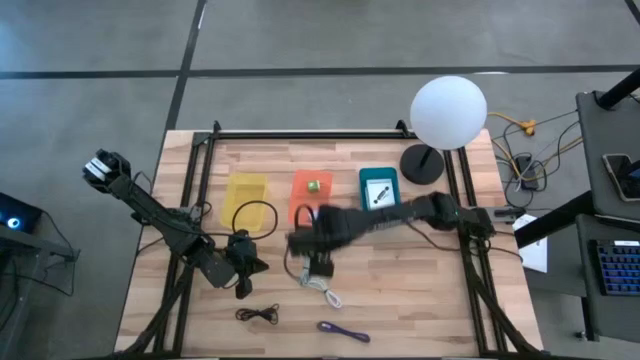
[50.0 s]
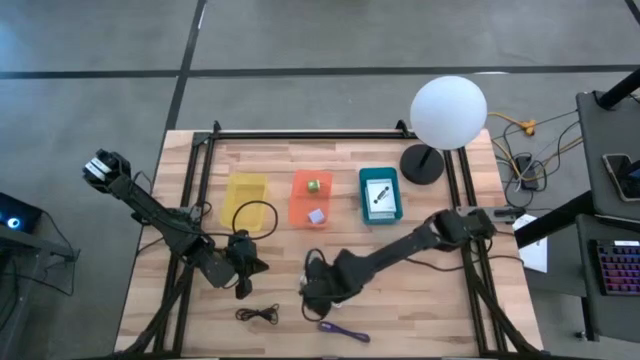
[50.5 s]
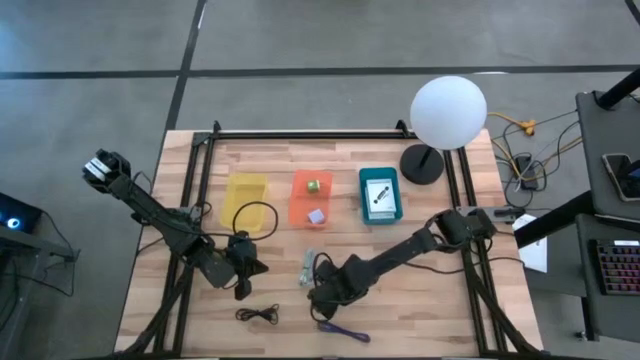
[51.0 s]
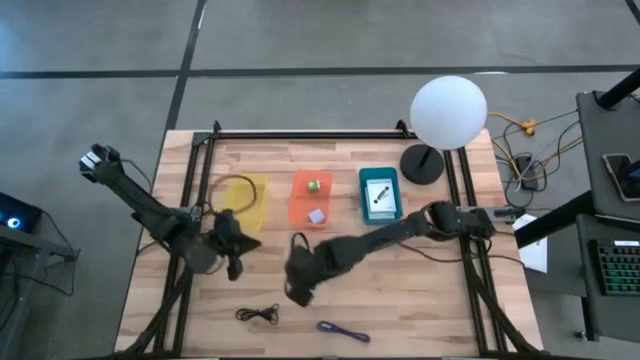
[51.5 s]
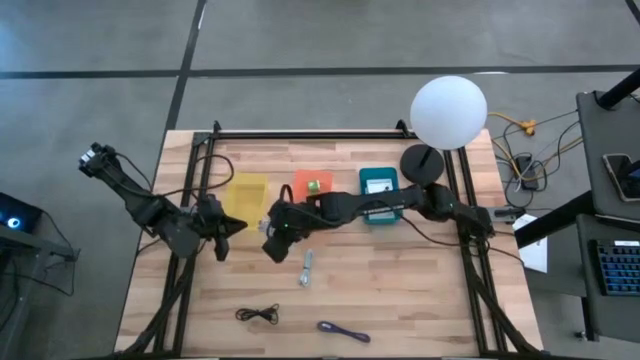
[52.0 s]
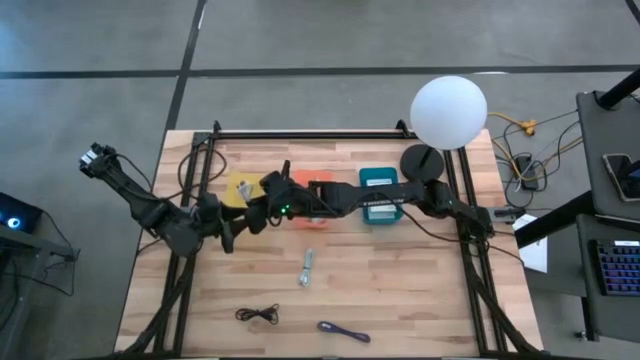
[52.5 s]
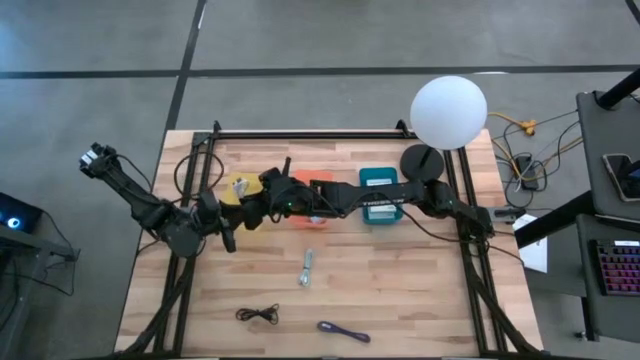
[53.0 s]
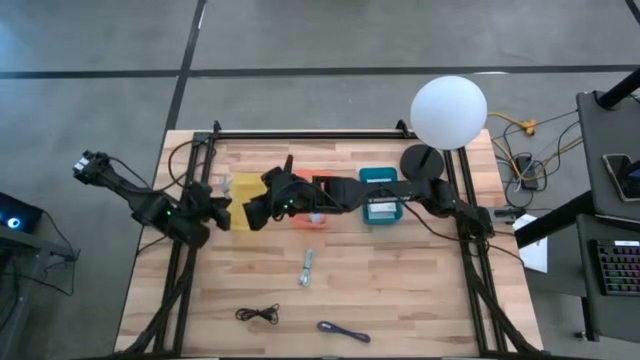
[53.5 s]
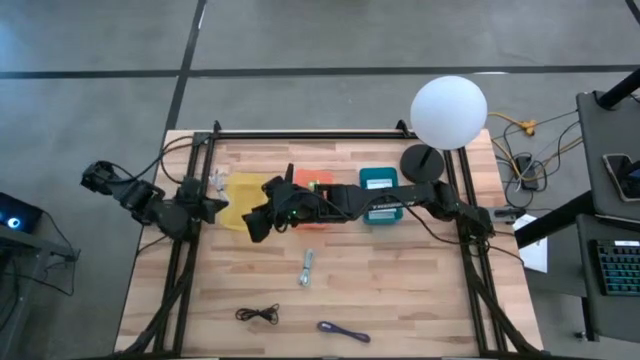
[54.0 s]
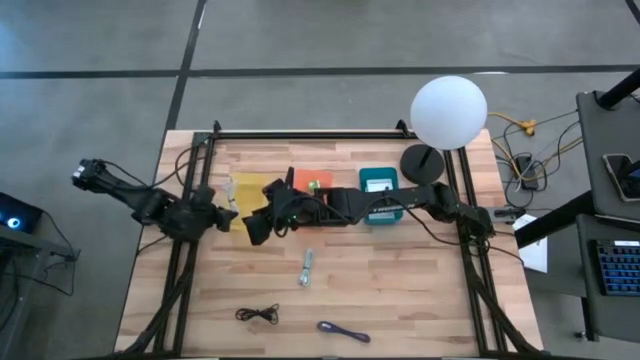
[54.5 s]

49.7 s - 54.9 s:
Task: Pick and place items into bin
Put the white charger cable into the yellow bin

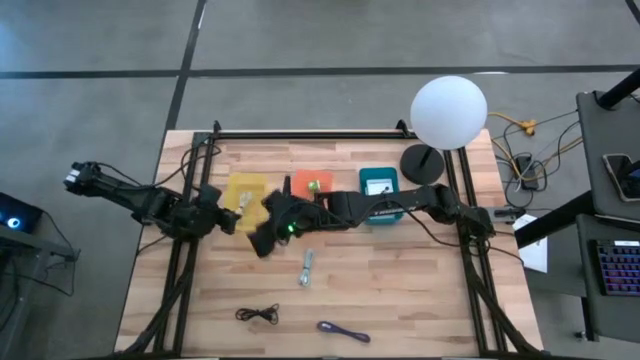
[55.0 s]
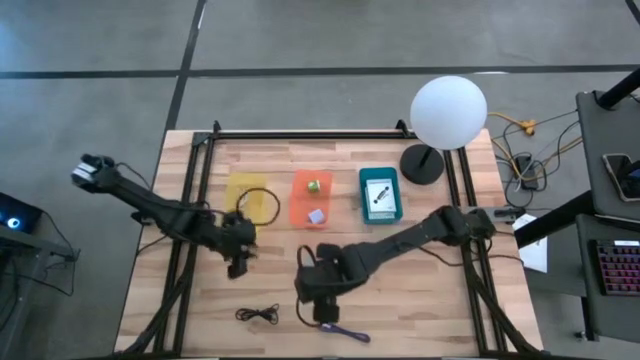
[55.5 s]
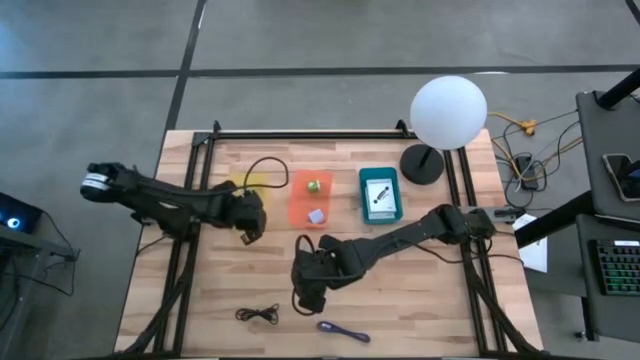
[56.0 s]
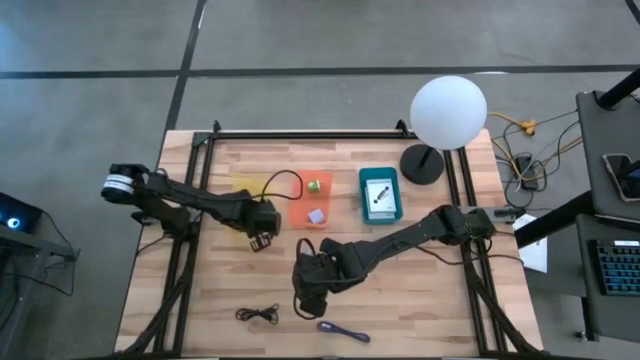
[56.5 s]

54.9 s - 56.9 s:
Adjust the yellow bin

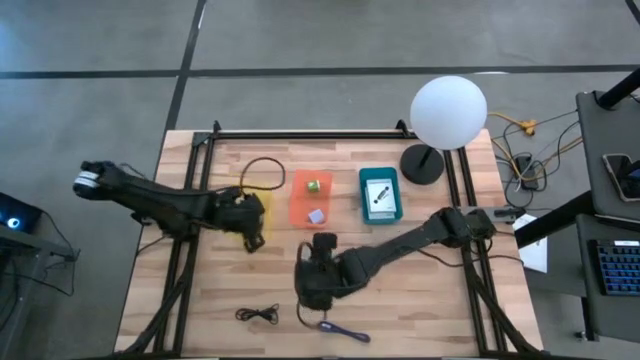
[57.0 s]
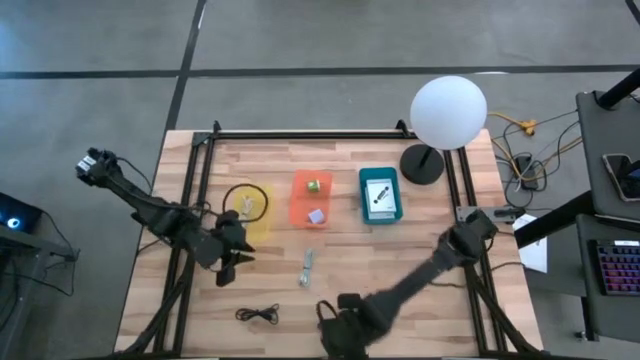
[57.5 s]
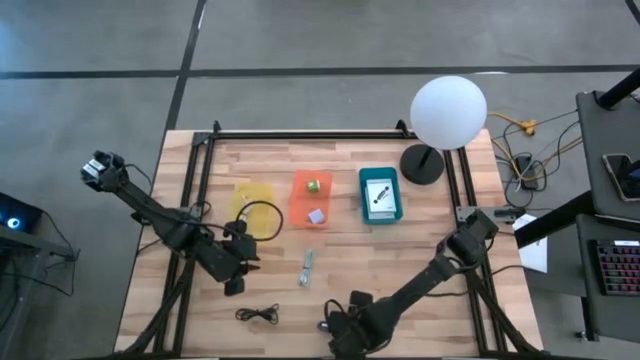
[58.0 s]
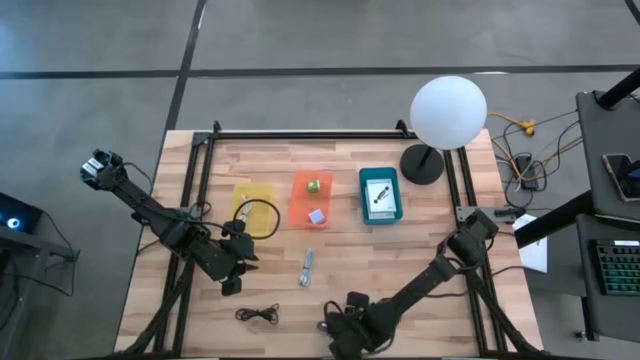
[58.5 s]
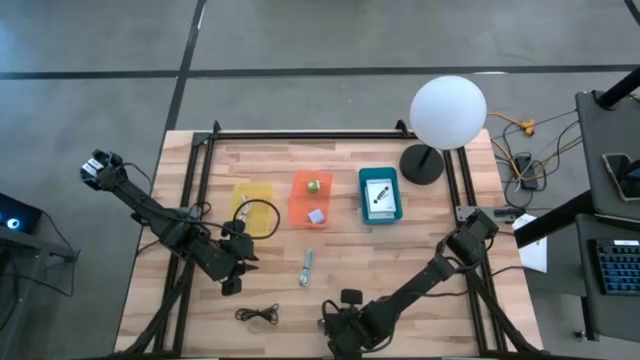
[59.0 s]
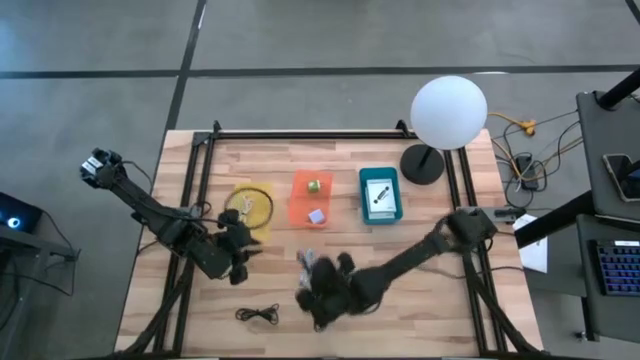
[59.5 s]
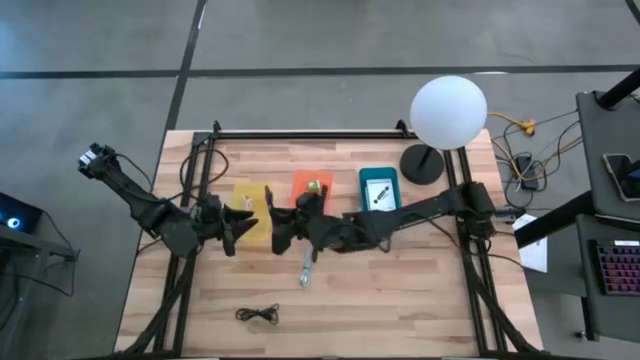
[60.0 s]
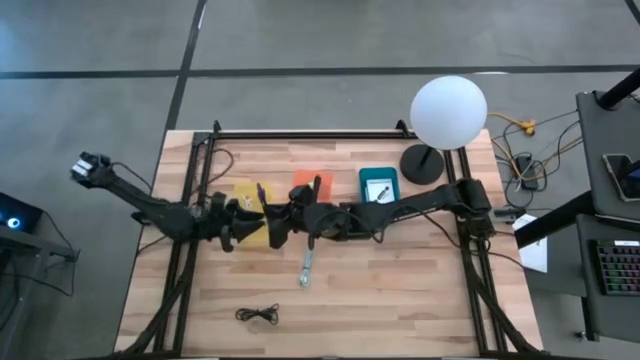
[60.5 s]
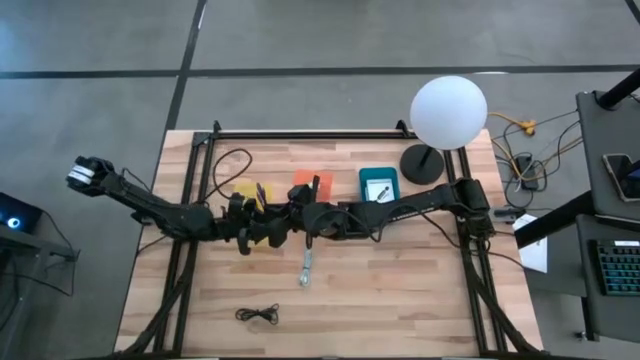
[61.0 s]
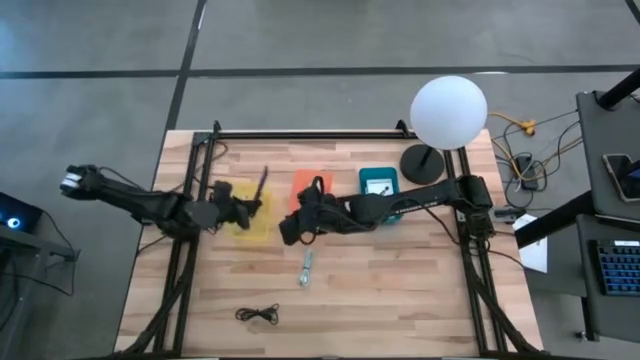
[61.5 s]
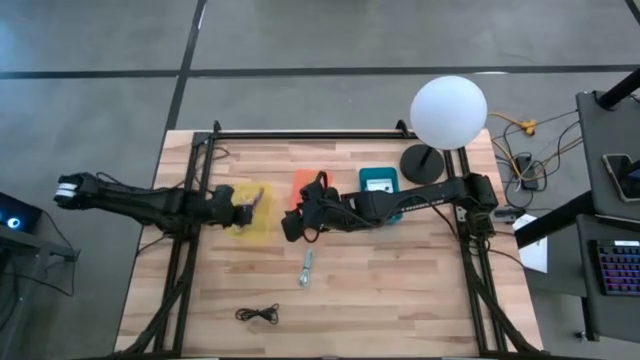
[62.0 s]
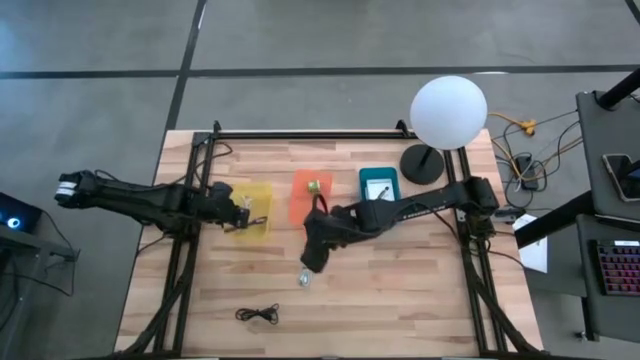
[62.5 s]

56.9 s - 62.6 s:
Put the blue charger cable into the yellow bin

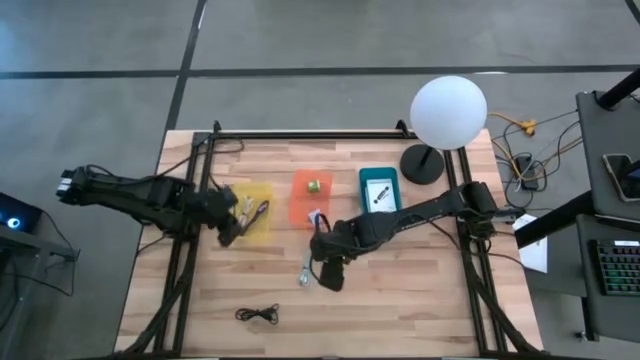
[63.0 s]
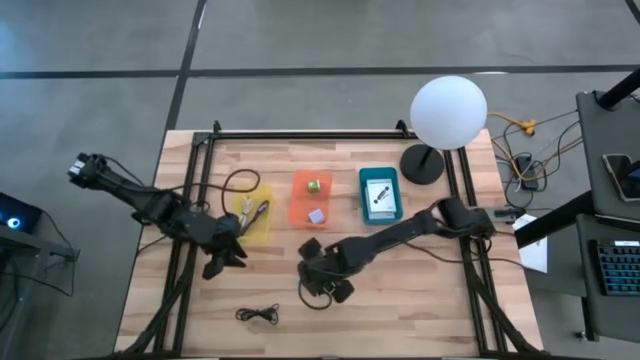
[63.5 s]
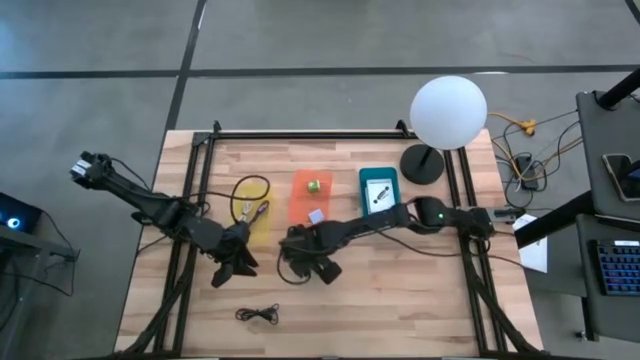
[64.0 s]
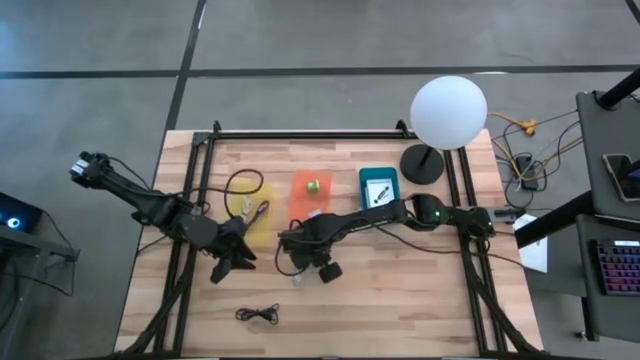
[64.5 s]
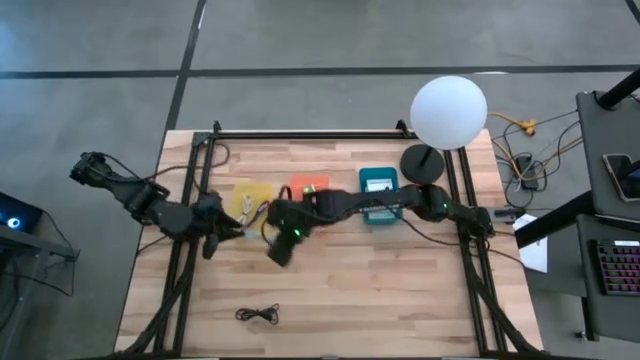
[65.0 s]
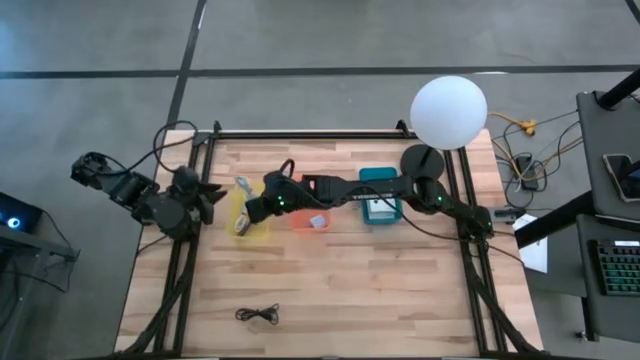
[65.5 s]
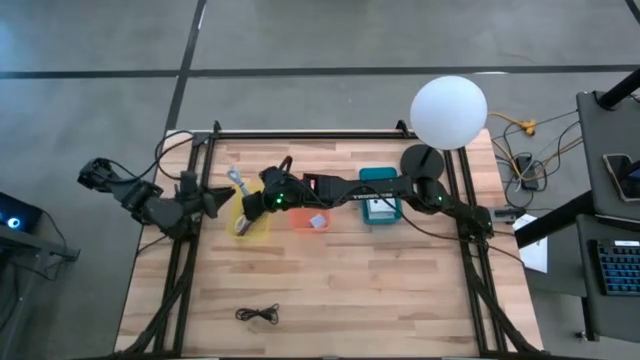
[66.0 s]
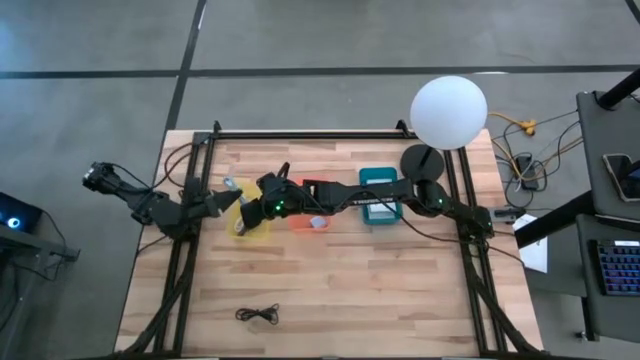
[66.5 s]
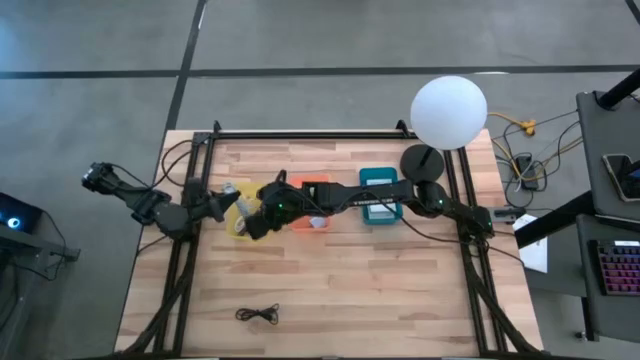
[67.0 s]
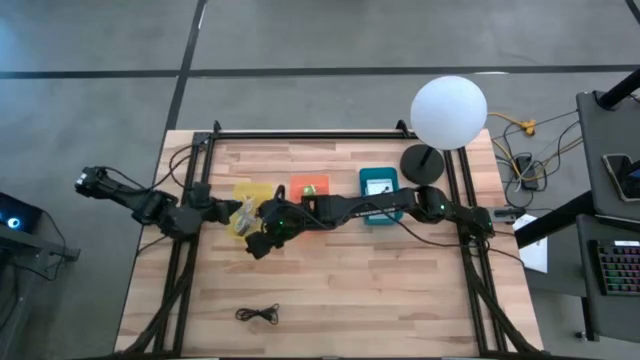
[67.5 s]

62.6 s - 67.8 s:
Put the light blue charger cable into the yellow bin

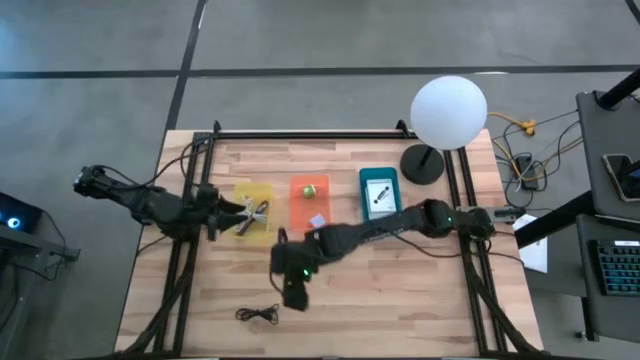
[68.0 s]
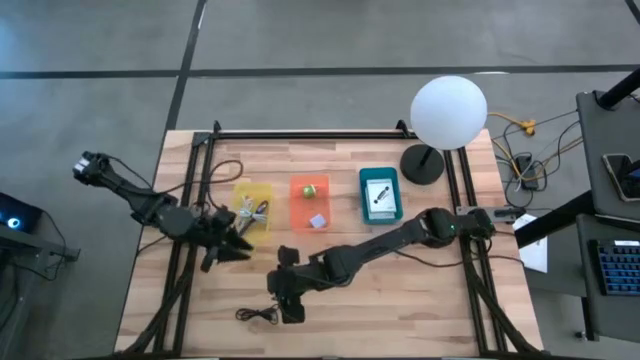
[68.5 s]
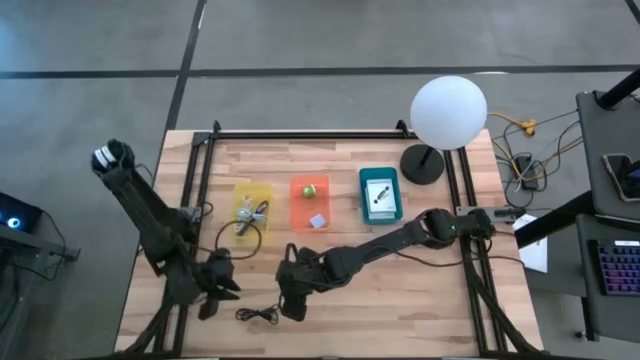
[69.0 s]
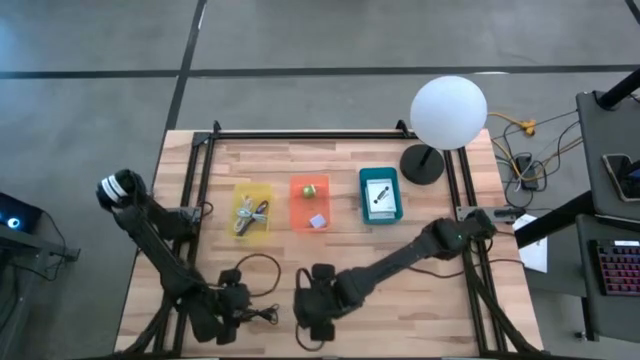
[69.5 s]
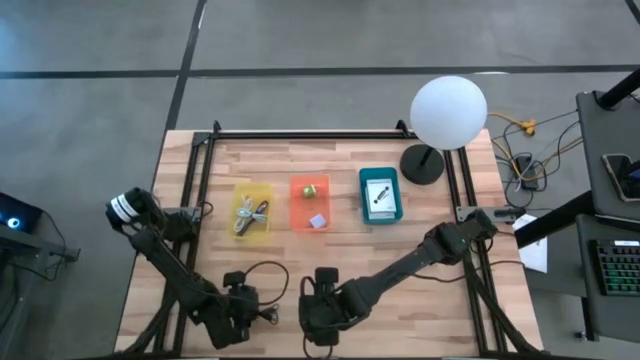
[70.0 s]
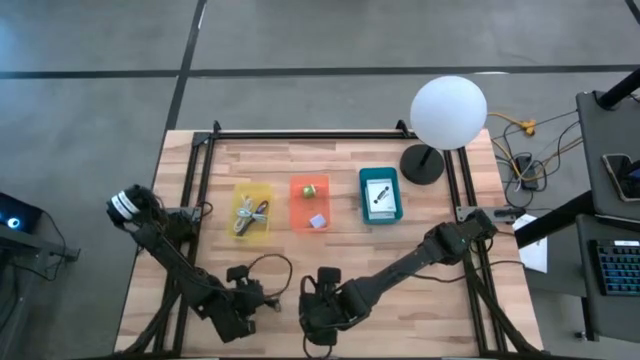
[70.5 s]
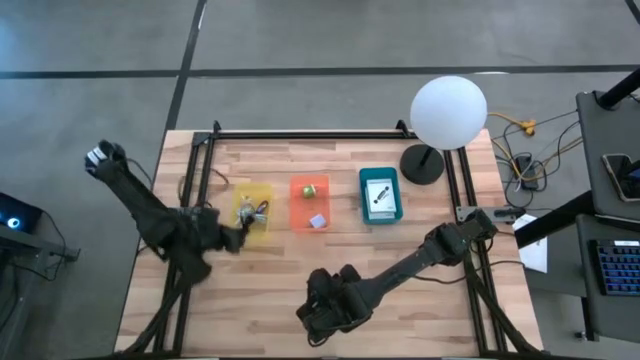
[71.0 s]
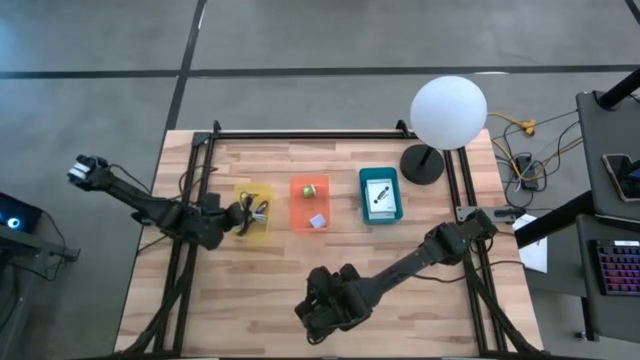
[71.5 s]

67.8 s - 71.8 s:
Put the black charger cable into the yellow bin
